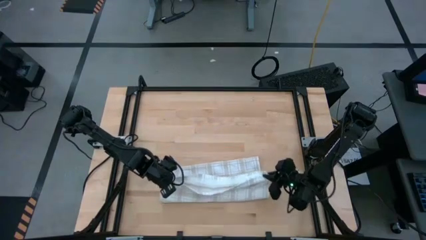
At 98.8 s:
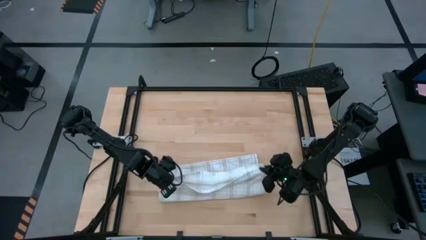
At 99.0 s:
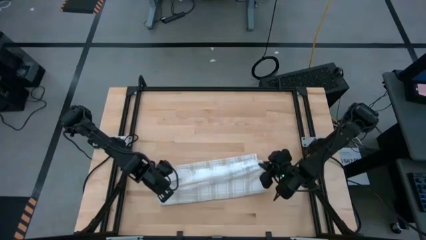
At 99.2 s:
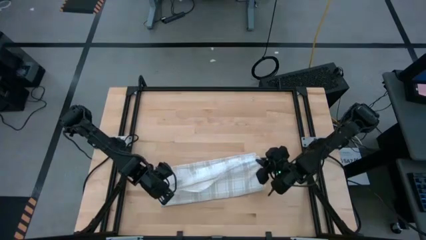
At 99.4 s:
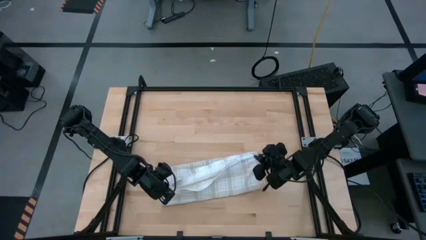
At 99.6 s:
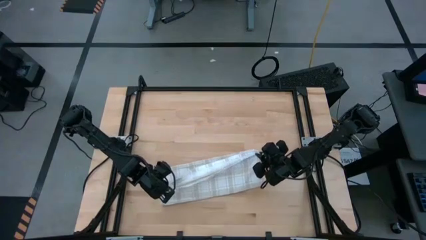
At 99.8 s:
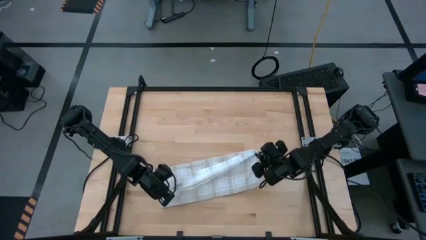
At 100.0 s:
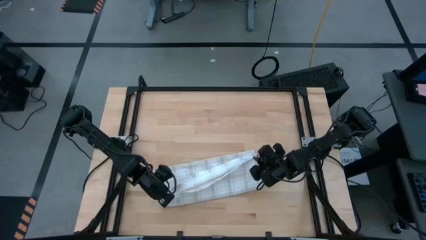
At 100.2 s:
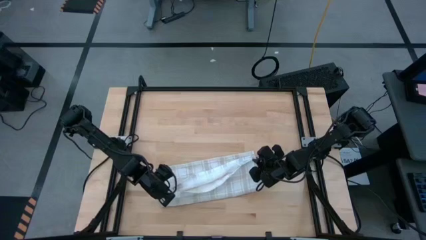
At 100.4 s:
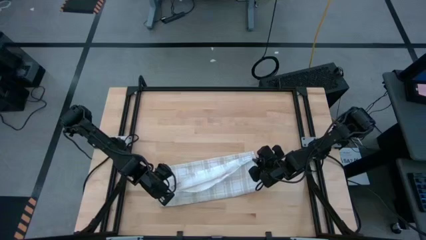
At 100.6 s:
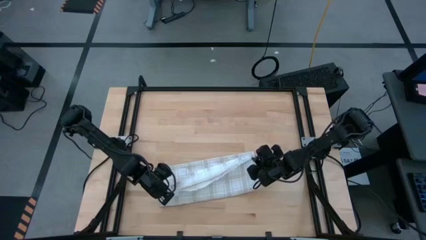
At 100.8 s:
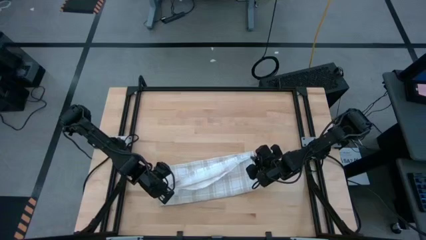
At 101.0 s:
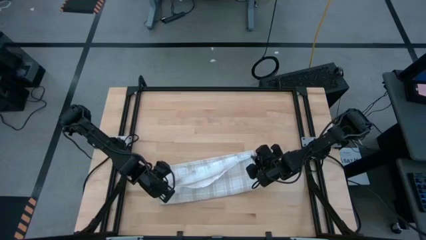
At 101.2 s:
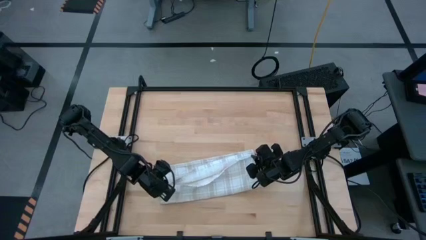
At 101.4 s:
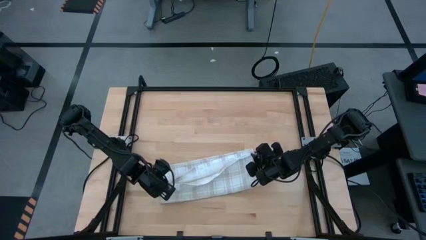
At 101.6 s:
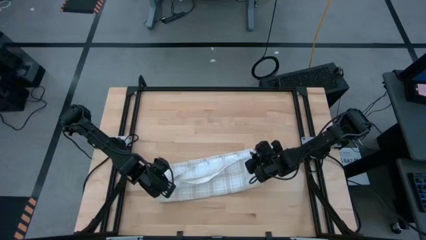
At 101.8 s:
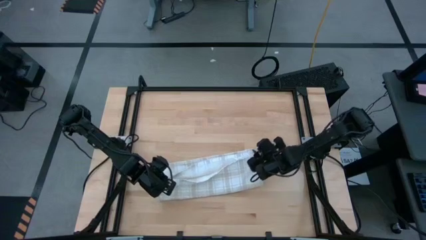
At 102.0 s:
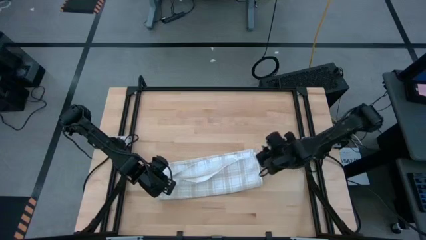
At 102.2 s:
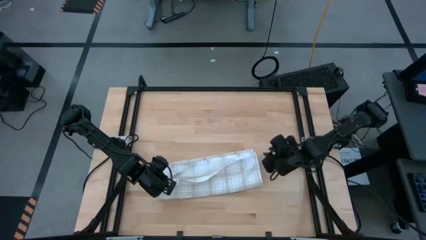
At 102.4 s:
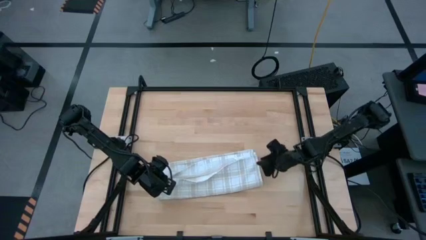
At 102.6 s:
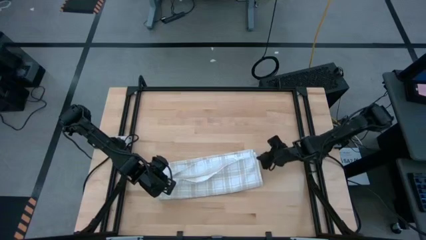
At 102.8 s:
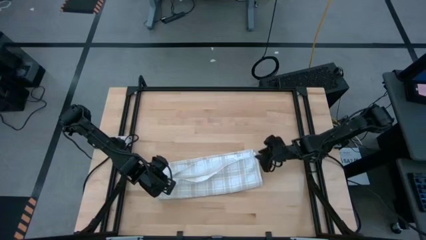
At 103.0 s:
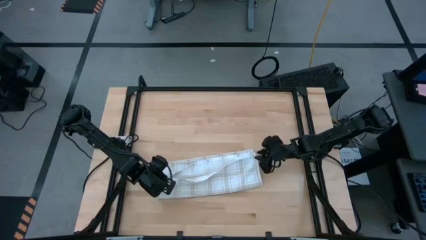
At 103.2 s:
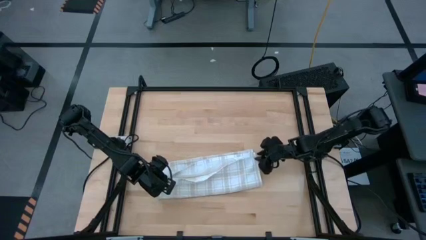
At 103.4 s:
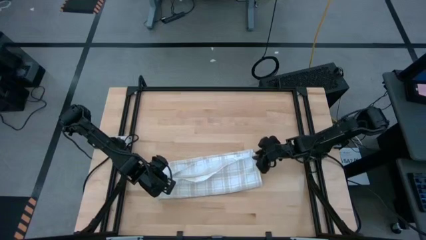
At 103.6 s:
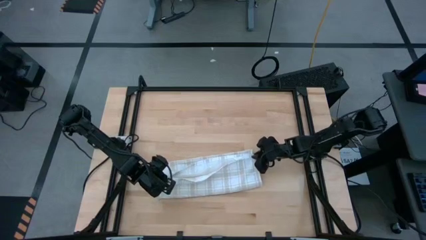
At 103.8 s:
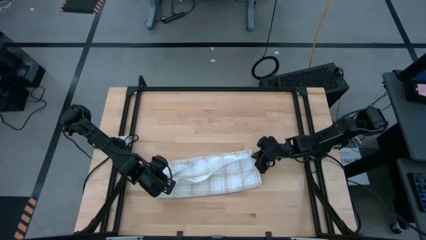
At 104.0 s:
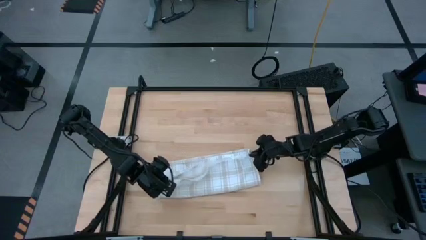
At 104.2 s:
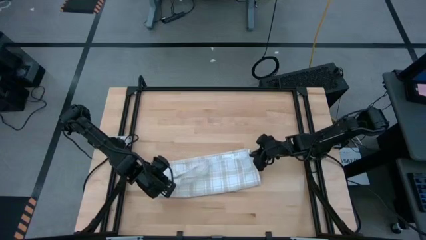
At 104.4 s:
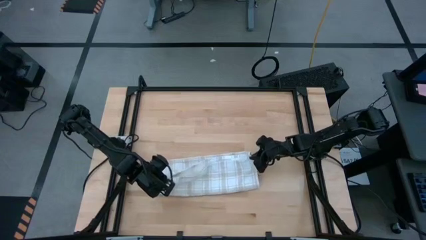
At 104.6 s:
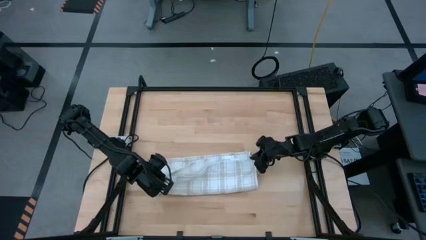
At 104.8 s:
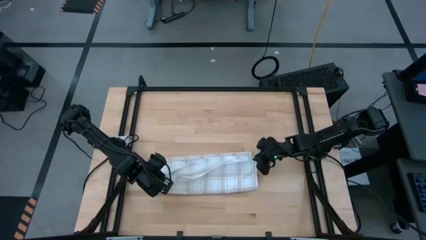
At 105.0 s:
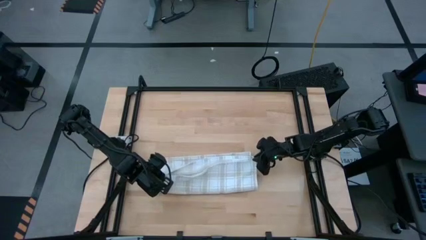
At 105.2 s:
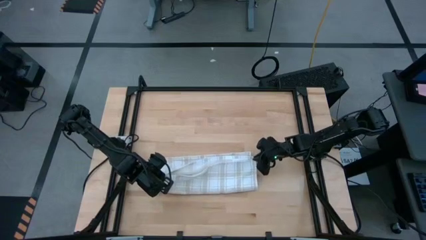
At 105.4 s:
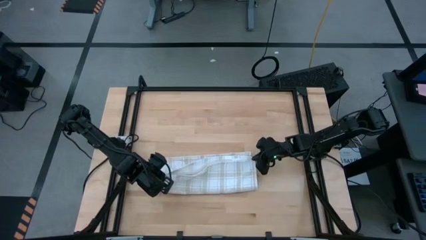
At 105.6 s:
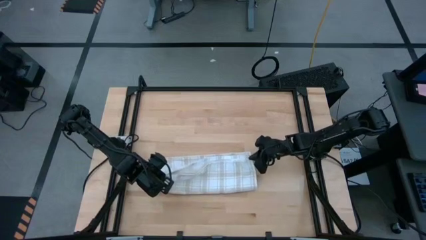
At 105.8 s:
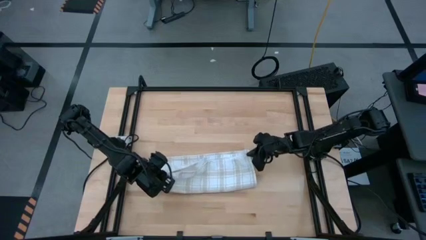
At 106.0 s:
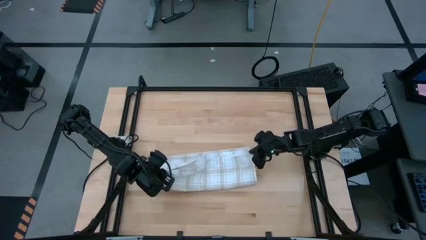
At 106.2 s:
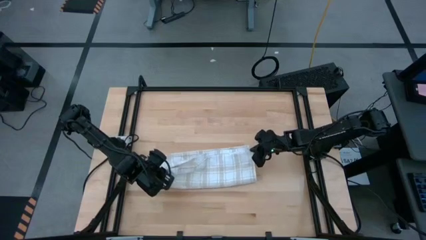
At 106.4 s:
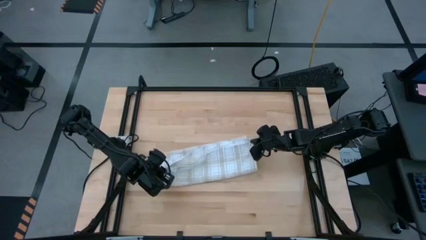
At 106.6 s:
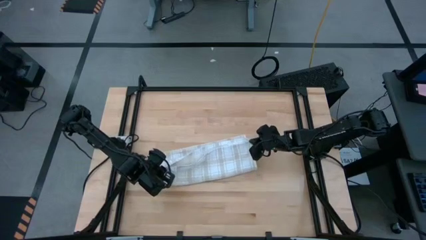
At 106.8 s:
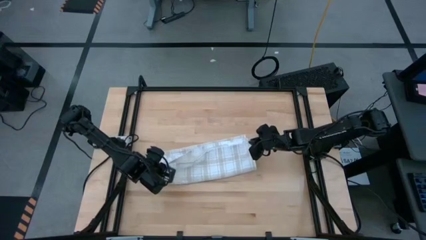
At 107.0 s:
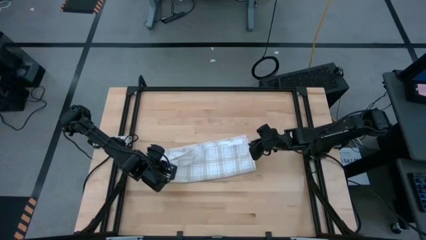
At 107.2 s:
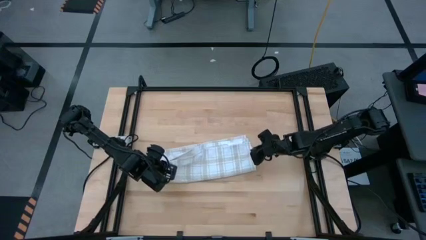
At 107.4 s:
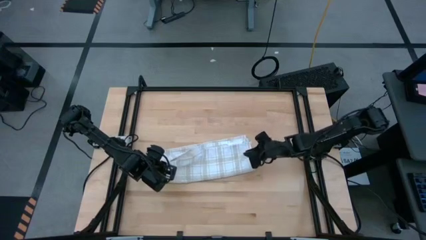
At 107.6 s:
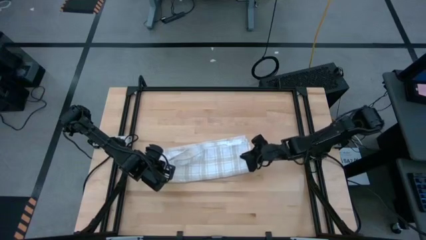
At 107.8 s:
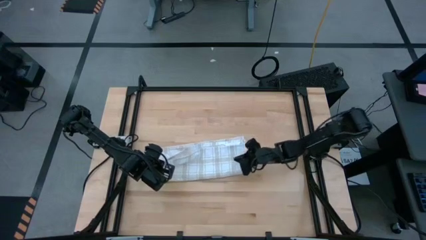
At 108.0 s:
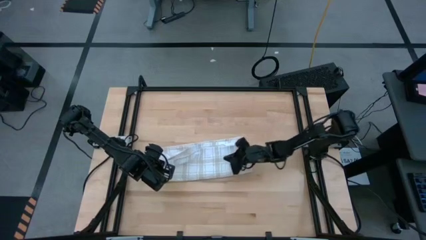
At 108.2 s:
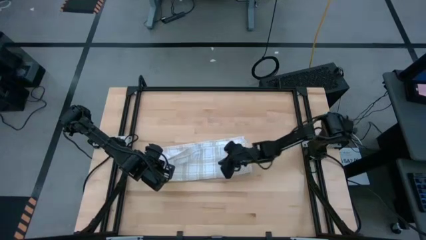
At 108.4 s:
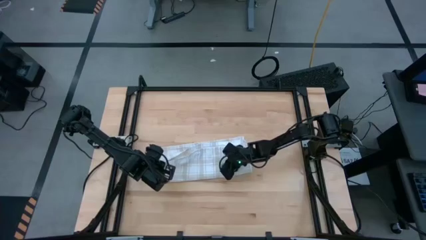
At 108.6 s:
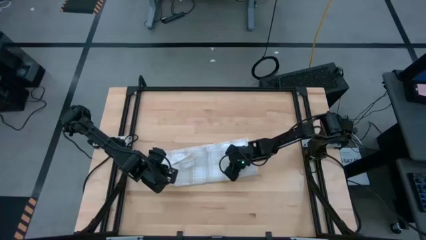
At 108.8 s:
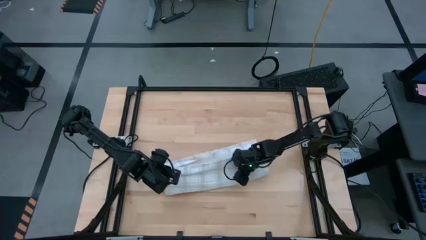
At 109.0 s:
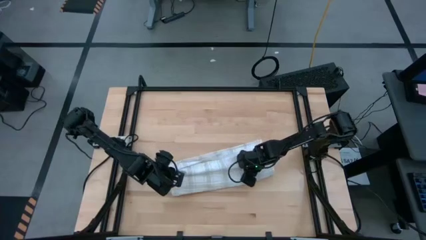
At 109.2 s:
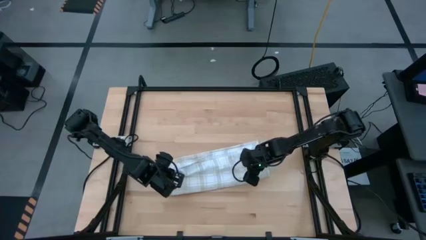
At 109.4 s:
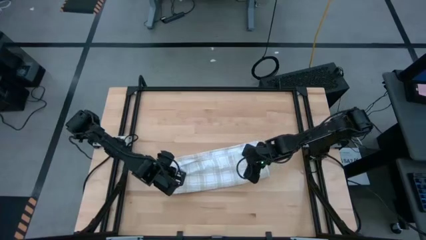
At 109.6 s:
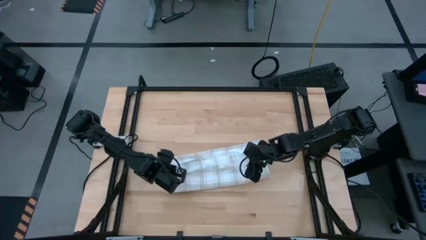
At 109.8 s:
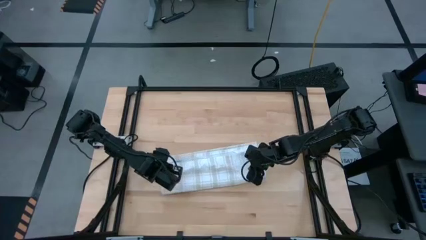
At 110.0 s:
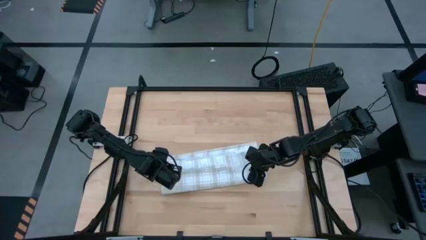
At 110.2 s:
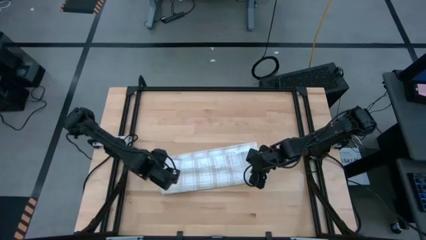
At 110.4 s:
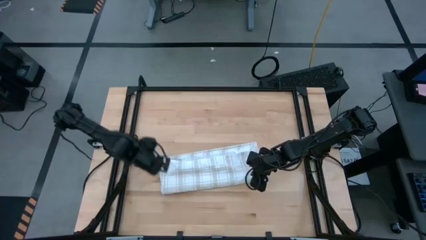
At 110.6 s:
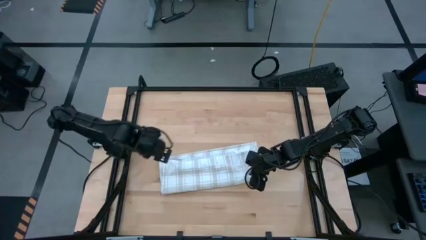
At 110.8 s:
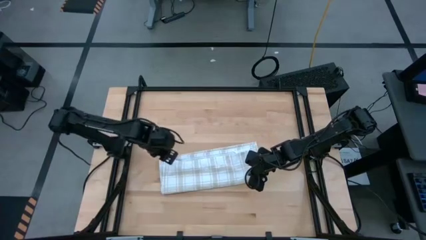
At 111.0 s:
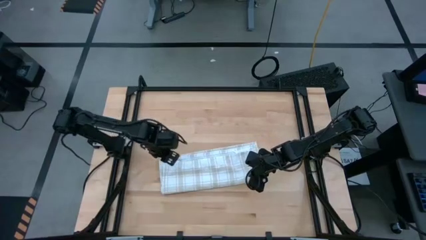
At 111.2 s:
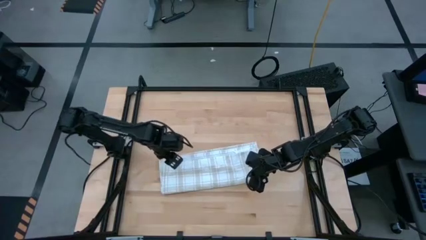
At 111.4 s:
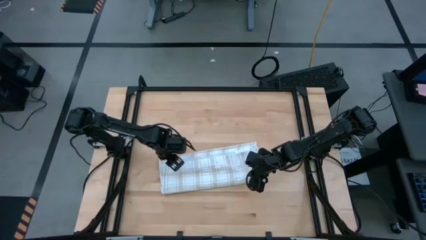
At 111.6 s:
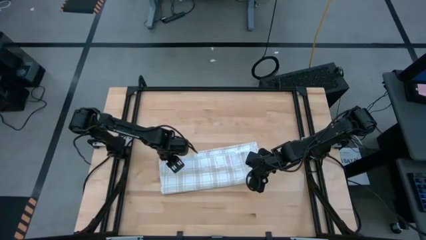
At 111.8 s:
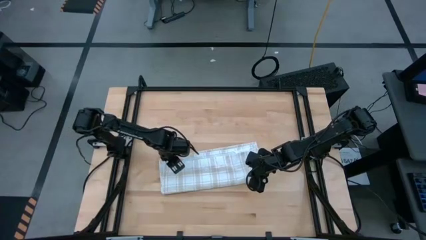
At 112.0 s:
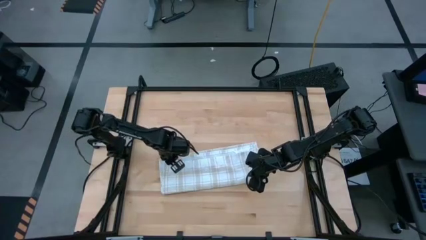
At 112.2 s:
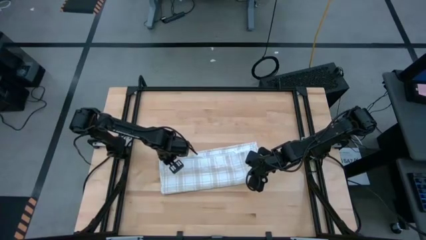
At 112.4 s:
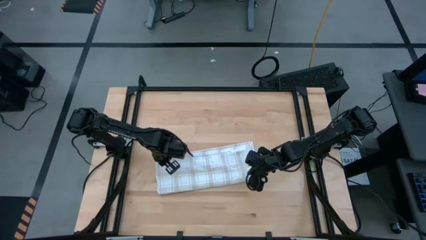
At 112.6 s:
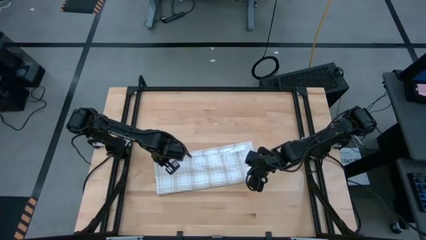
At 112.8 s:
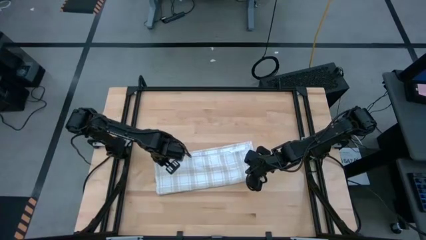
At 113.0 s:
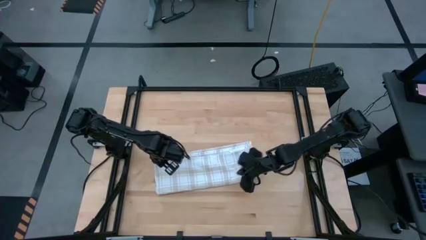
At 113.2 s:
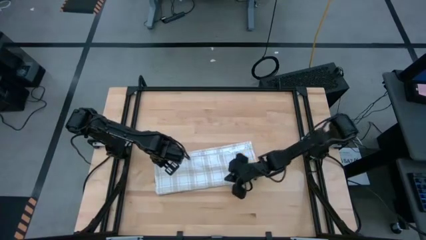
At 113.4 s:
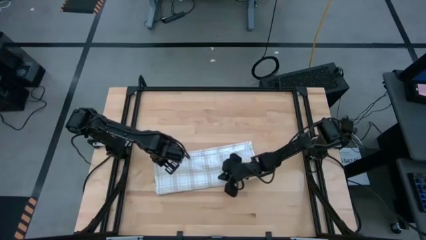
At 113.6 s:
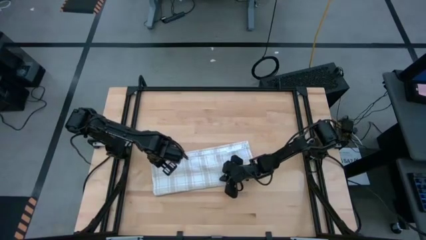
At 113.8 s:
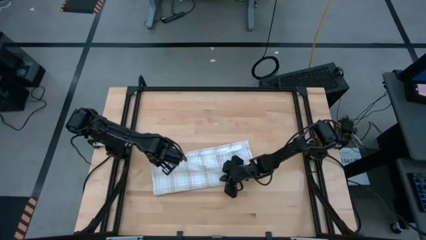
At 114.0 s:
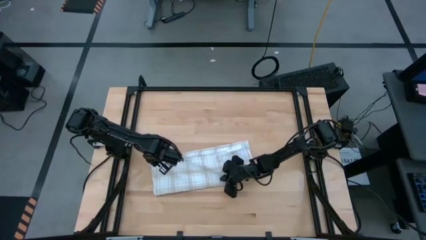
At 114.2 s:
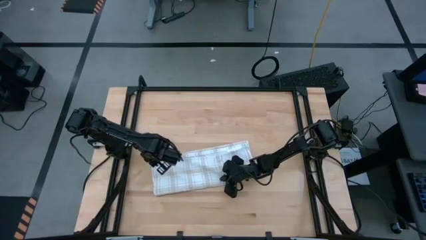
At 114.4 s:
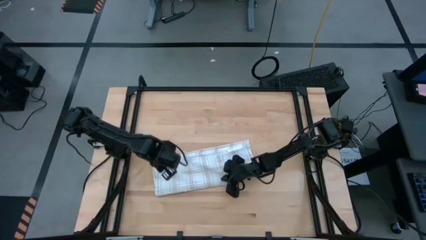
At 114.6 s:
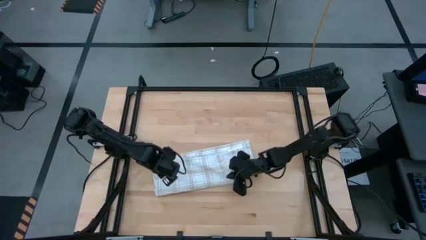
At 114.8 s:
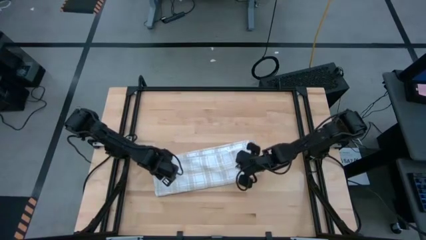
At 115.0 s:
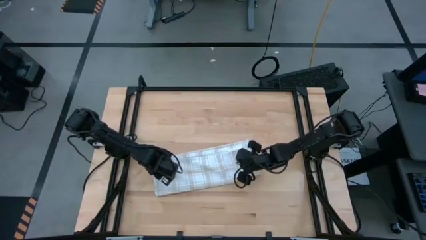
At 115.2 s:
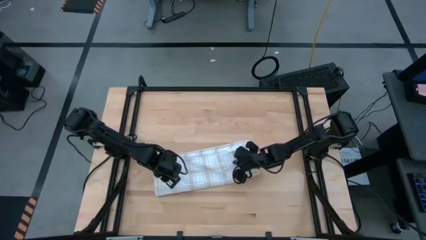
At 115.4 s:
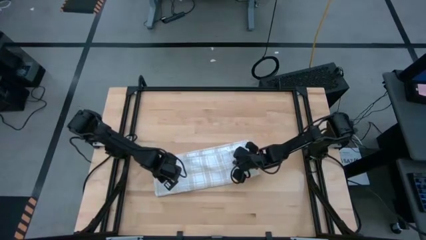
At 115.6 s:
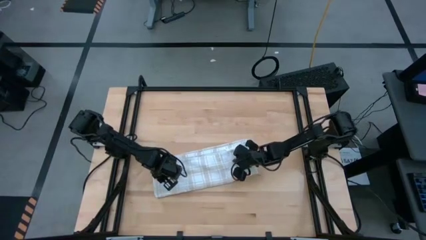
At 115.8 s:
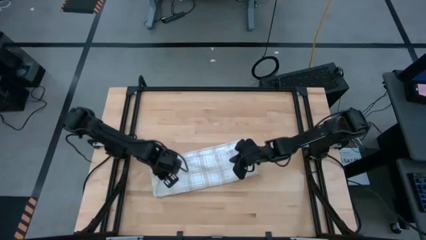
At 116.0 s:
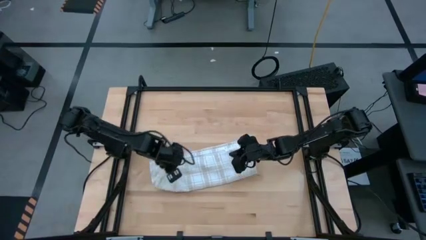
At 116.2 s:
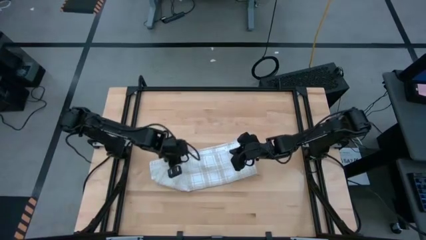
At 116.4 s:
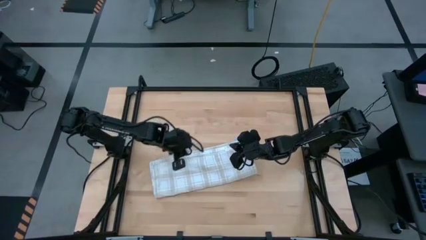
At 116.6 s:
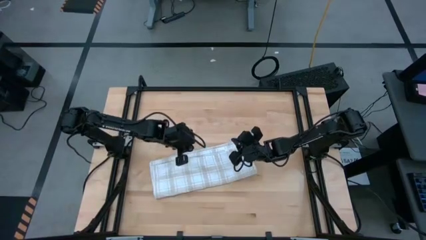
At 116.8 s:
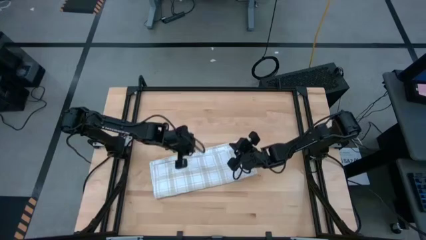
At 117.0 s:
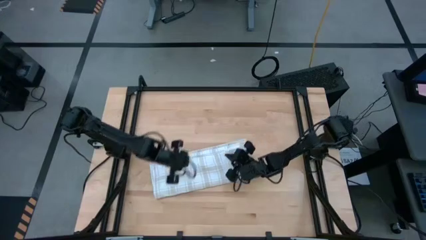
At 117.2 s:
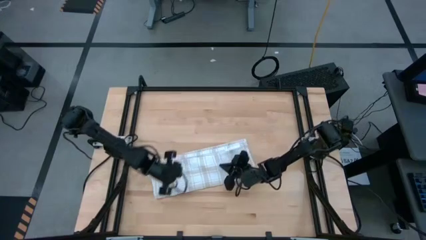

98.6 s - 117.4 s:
Task: Roll towel
Roll the white kitchen towel
